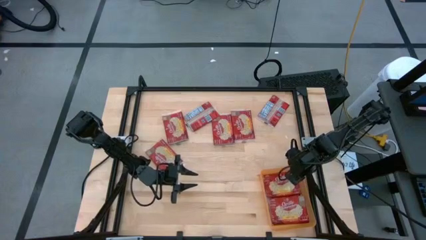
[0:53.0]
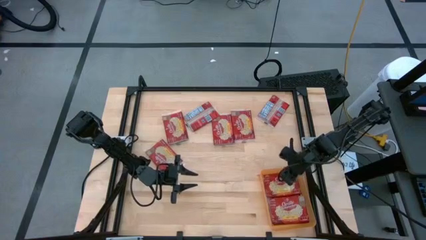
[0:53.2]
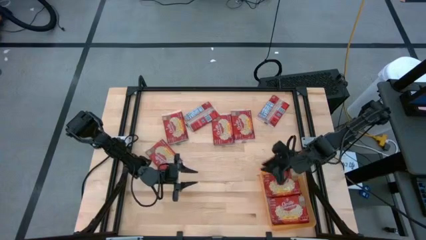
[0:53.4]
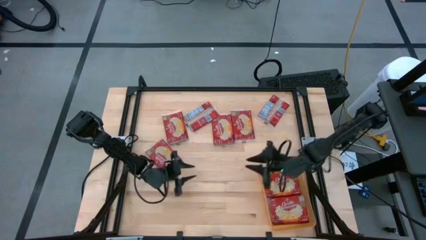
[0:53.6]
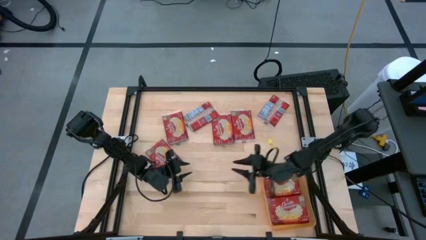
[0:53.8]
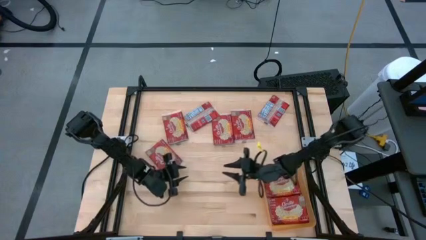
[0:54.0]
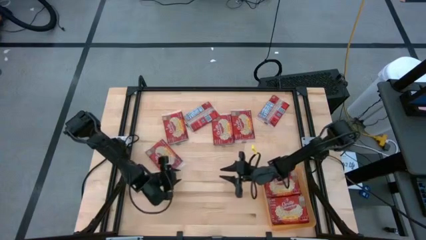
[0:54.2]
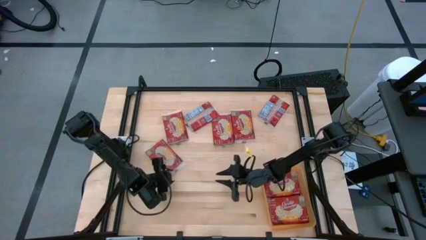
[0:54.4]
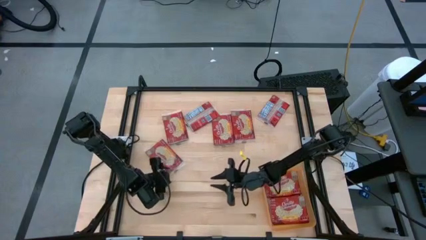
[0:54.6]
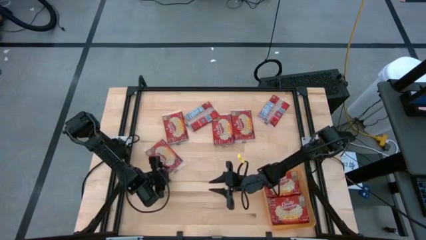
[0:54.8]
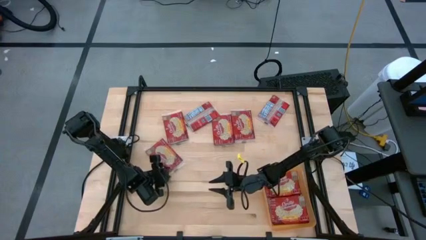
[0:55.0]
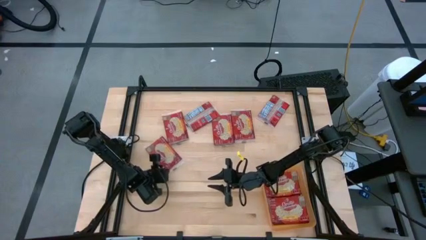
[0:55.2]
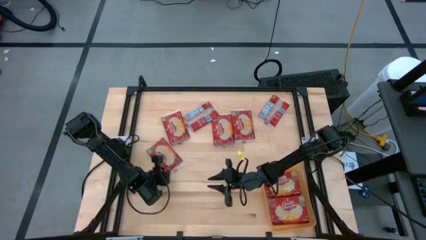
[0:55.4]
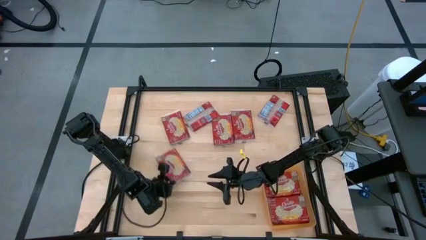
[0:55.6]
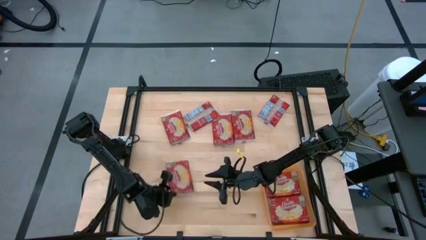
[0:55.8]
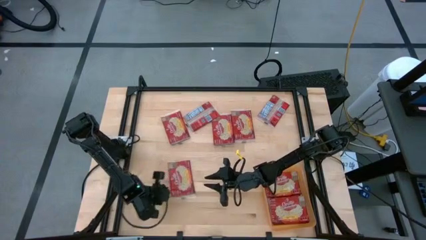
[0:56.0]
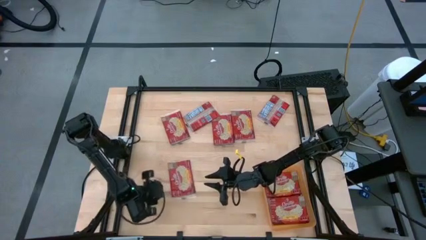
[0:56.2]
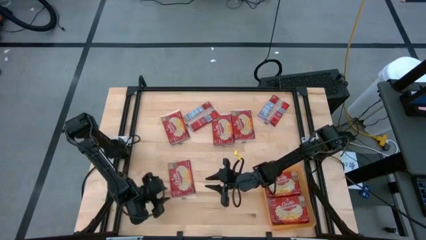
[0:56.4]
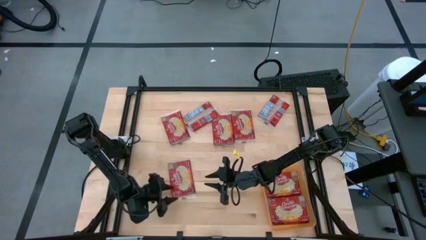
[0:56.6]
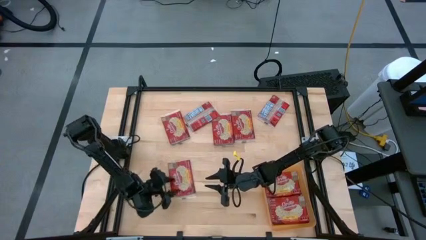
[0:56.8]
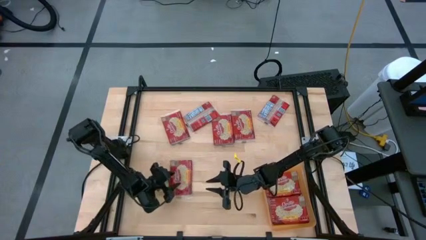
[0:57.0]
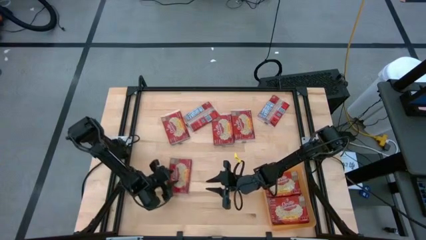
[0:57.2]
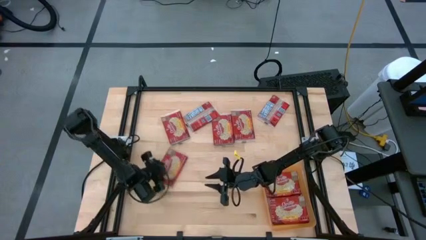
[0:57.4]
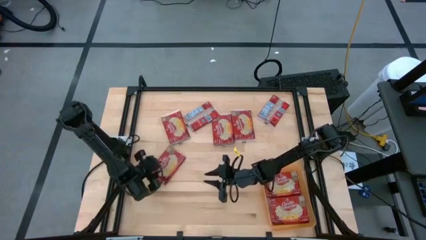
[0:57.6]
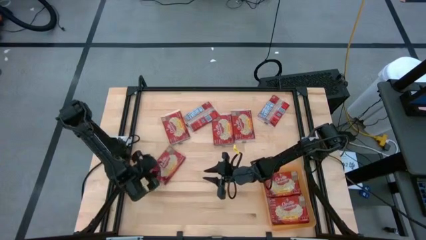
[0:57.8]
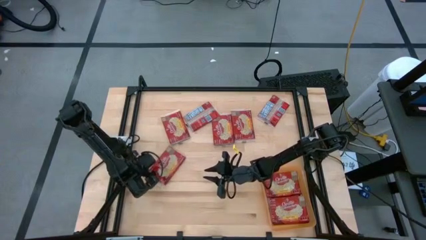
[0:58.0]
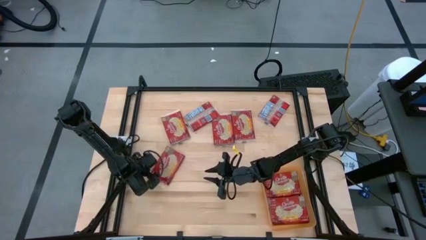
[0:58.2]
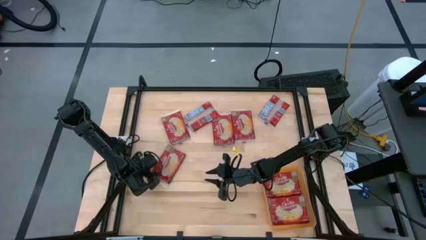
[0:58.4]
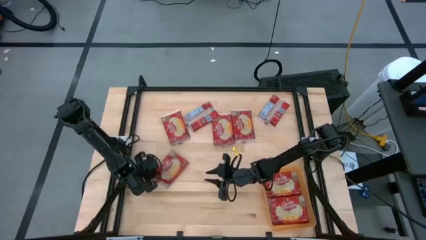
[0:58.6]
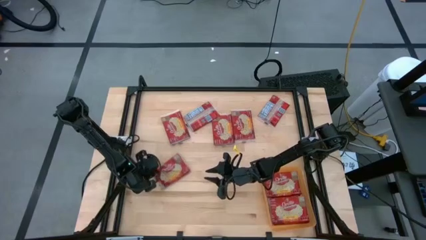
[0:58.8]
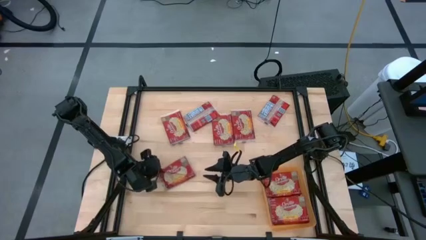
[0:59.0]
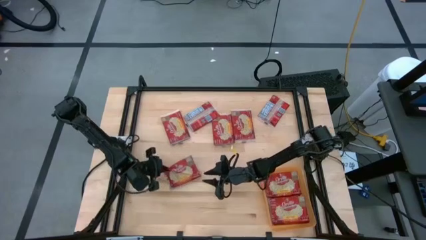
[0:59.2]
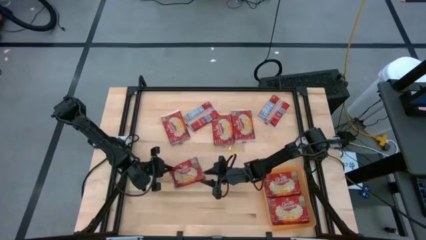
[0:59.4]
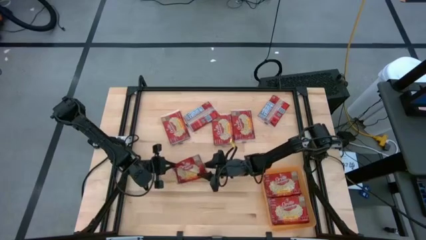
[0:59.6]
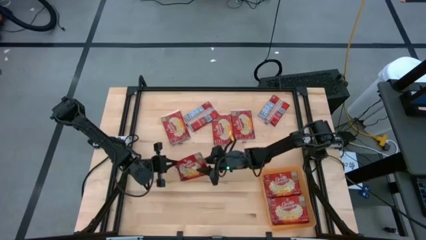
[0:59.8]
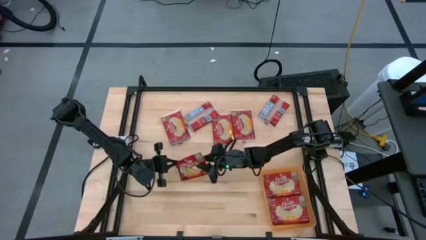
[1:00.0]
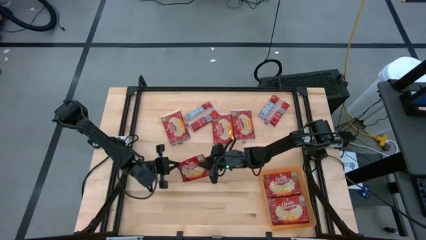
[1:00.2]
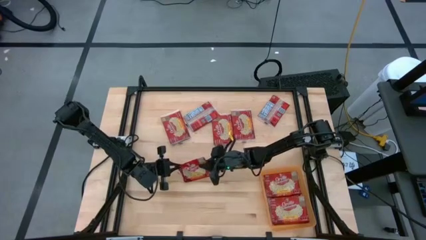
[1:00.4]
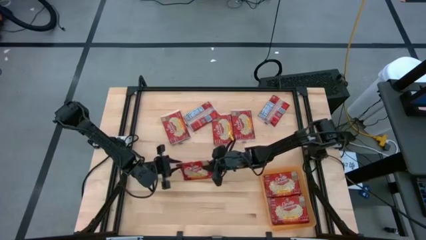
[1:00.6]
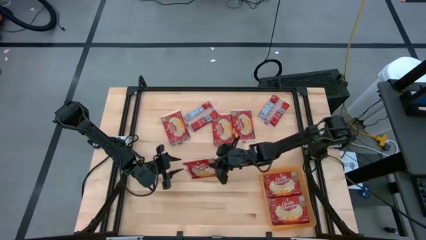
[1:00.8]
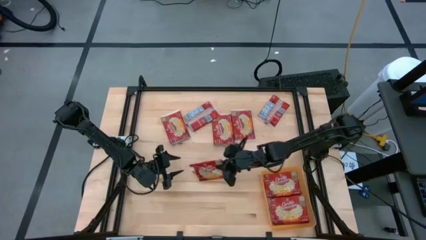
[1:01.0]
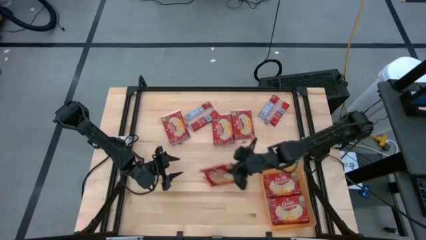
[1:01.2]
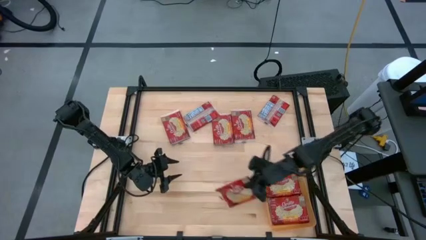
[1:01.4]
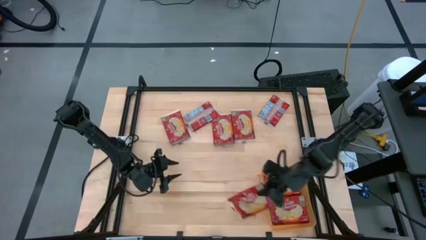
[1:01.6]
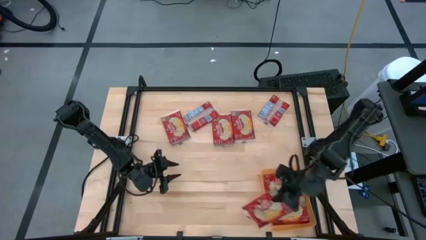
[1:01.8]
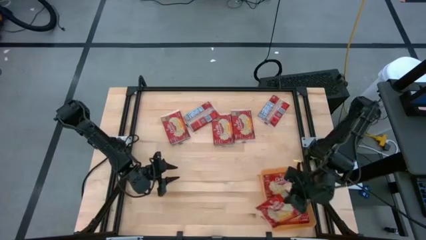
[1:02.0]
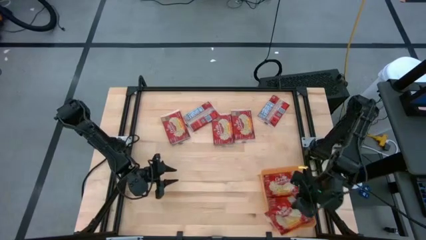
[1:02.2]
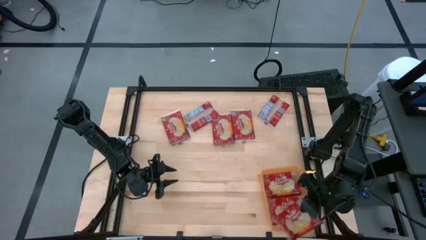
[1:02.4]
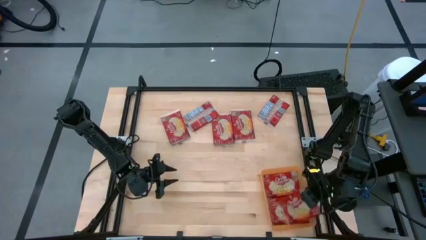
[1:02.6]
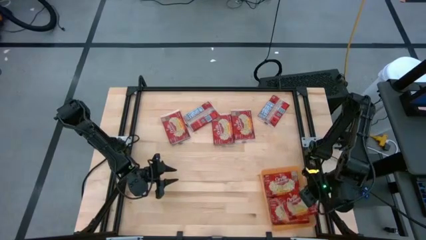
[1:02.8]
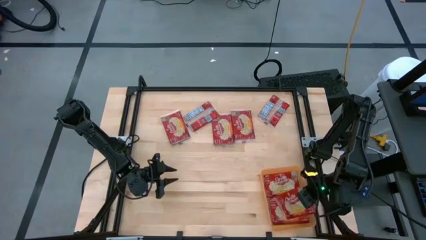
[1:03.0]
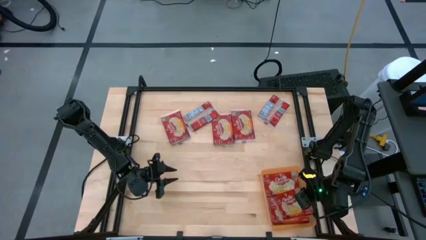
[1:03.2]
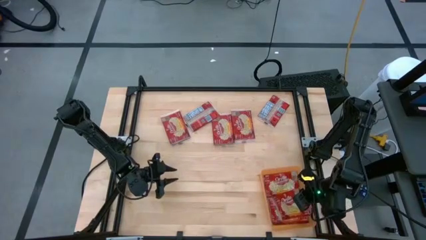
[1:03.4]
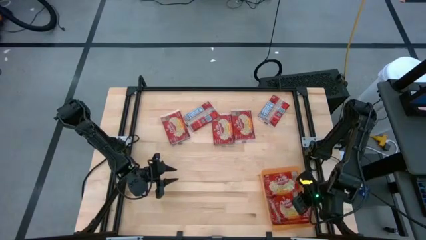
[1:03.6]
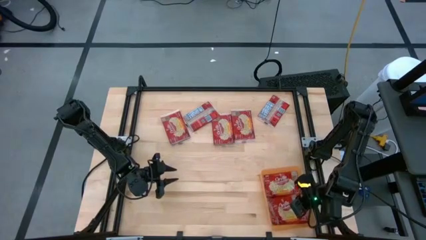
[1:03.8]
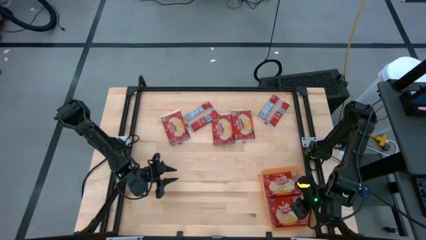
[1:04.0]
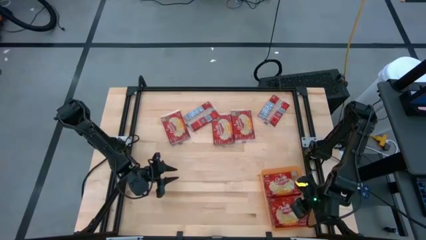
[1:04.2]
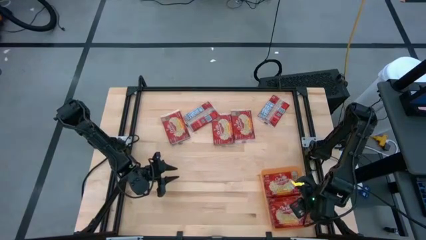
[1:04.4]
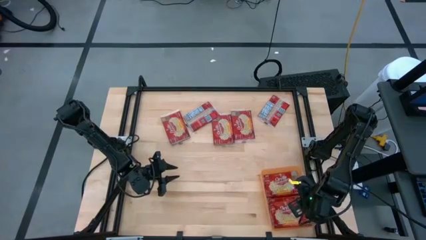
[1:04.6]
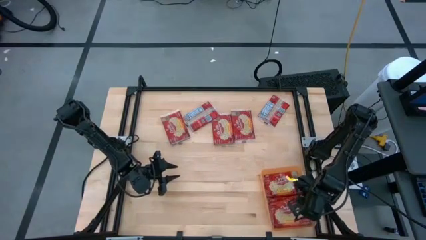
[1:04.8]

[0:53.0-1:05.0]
Task: Sort popcorn bags into baskets
Put the popcorn pack into the orange bin
